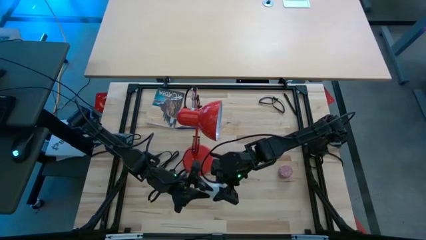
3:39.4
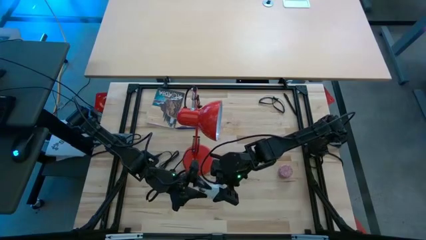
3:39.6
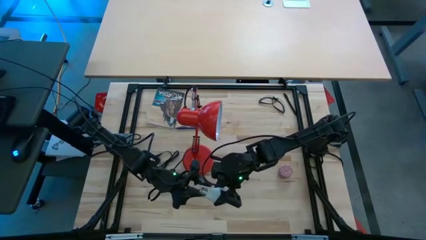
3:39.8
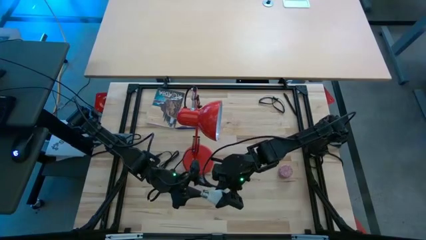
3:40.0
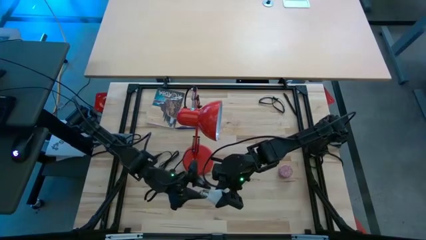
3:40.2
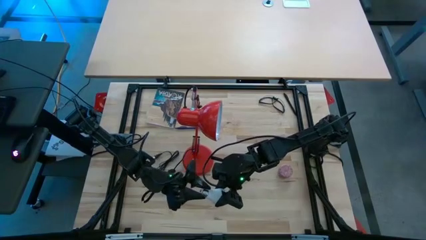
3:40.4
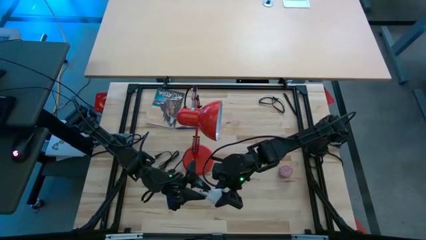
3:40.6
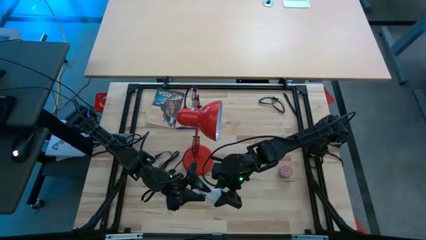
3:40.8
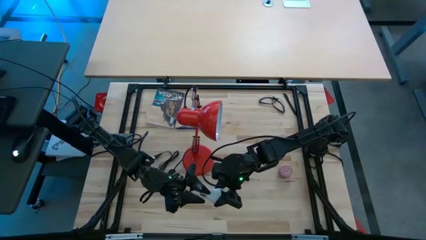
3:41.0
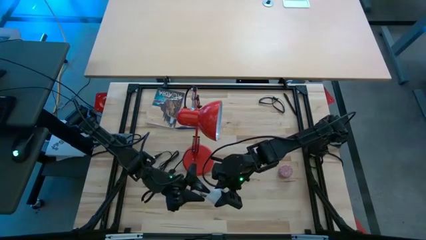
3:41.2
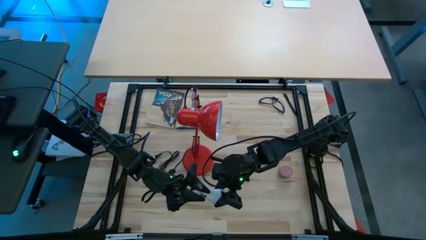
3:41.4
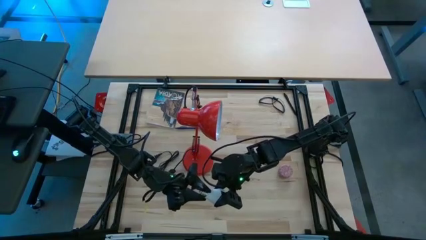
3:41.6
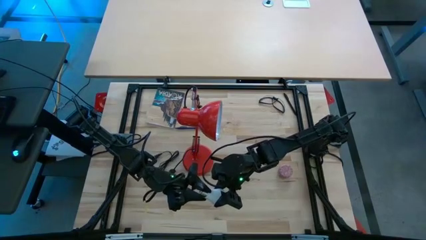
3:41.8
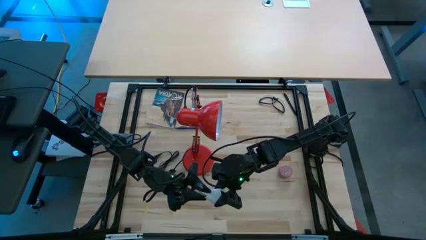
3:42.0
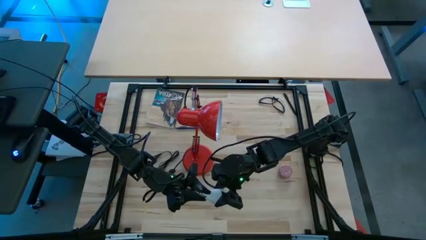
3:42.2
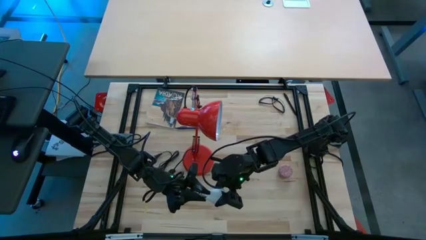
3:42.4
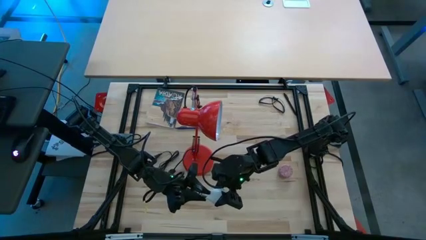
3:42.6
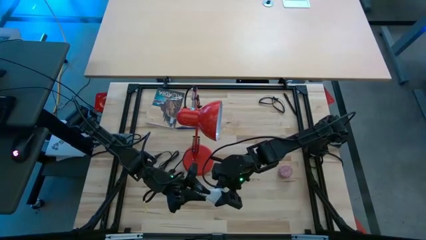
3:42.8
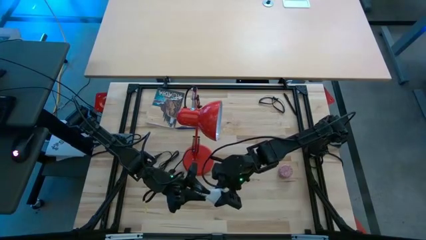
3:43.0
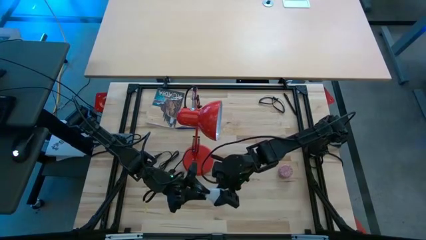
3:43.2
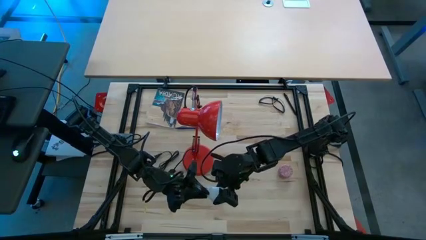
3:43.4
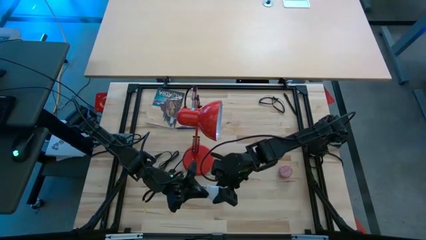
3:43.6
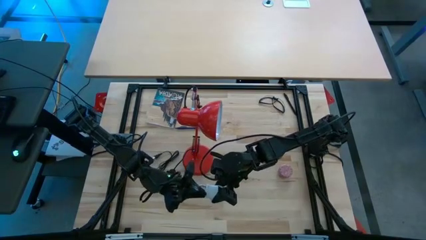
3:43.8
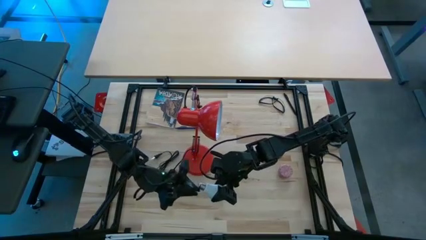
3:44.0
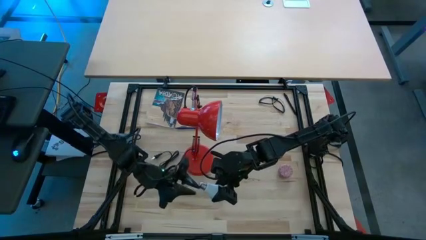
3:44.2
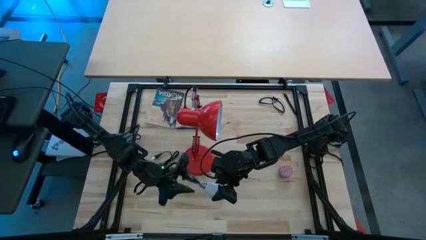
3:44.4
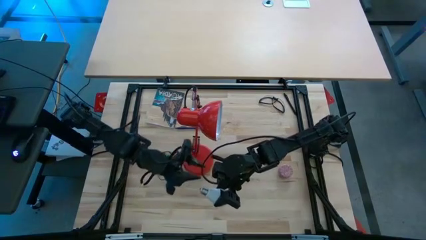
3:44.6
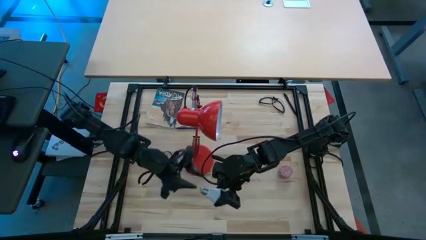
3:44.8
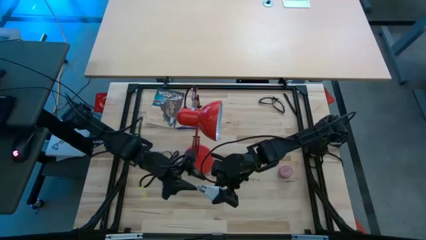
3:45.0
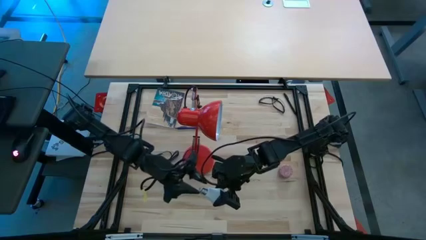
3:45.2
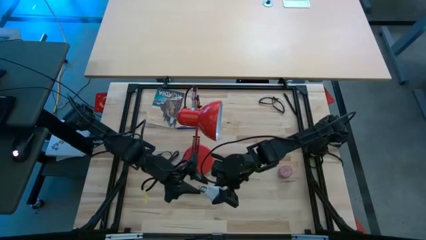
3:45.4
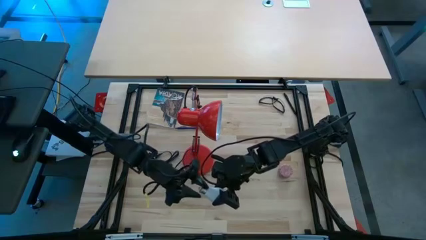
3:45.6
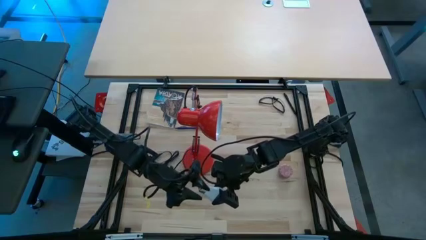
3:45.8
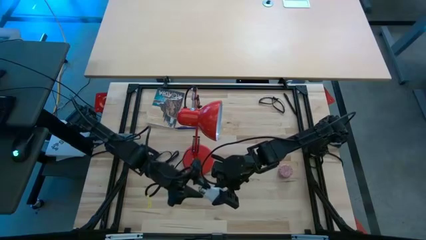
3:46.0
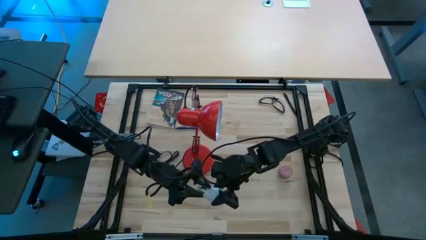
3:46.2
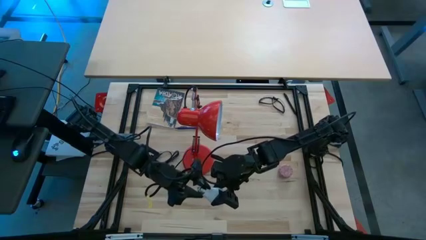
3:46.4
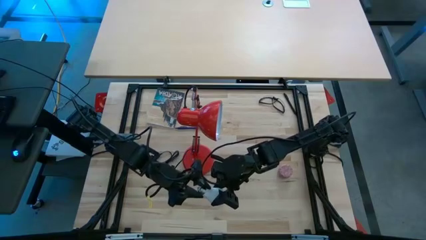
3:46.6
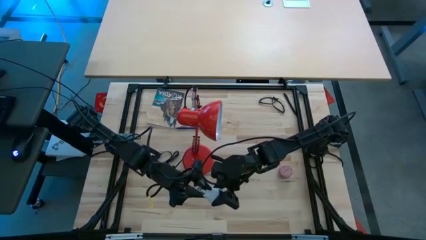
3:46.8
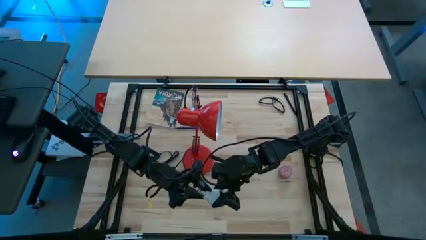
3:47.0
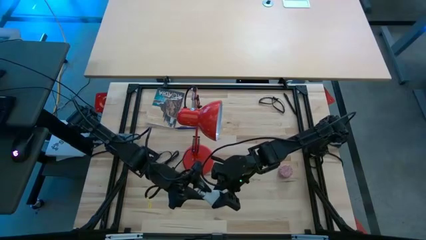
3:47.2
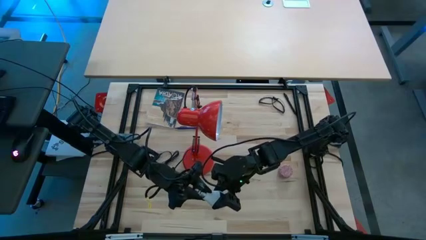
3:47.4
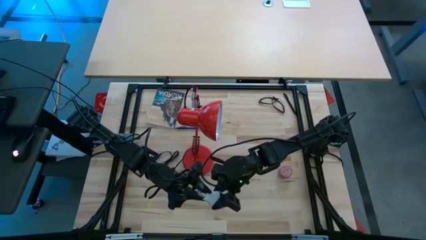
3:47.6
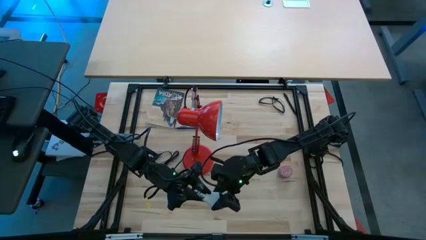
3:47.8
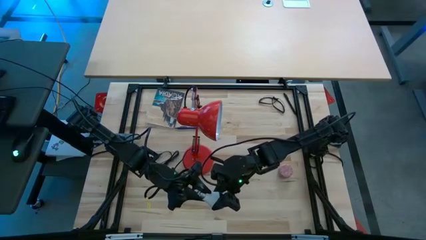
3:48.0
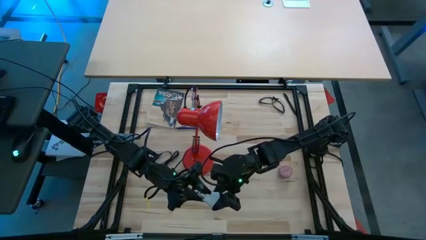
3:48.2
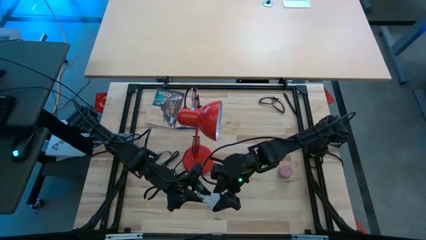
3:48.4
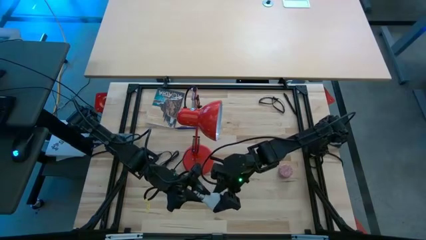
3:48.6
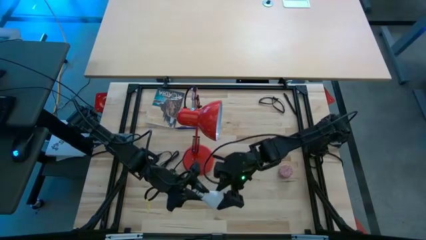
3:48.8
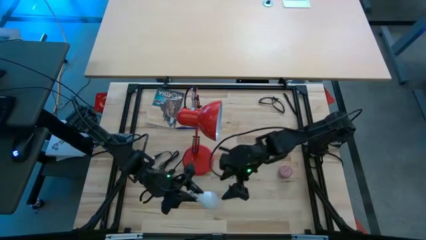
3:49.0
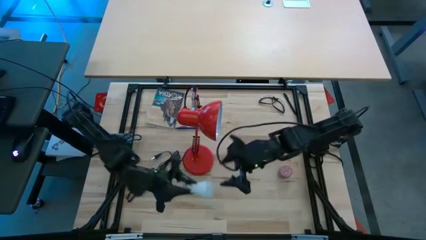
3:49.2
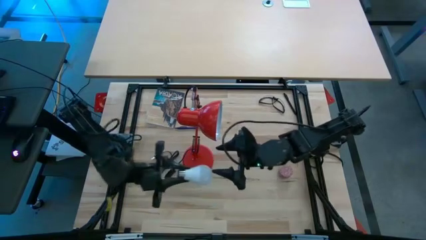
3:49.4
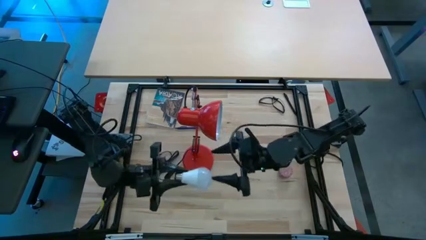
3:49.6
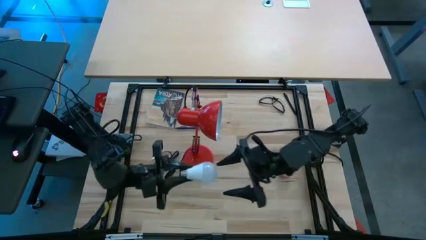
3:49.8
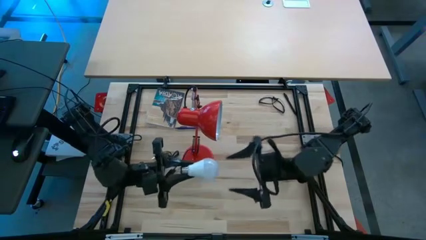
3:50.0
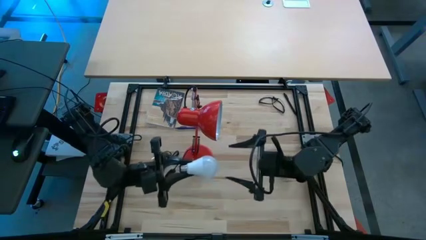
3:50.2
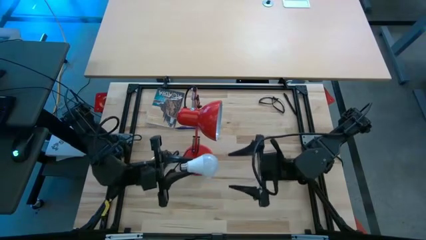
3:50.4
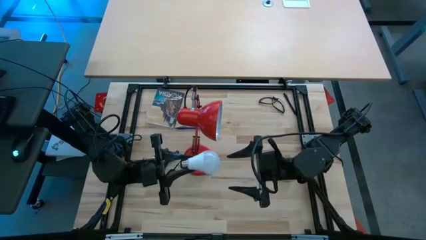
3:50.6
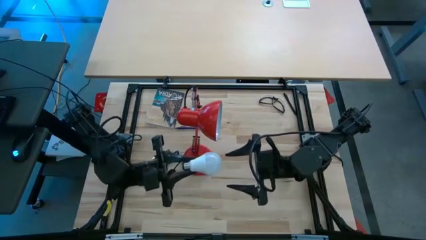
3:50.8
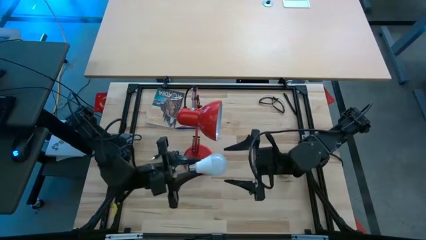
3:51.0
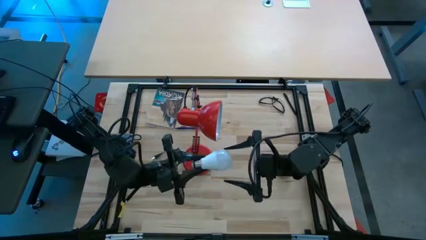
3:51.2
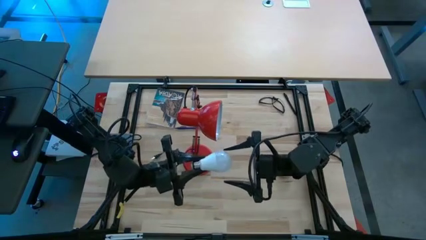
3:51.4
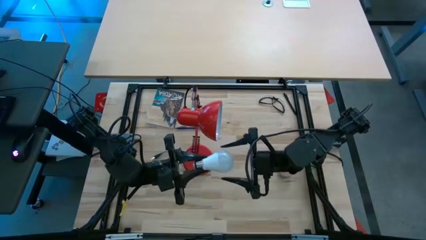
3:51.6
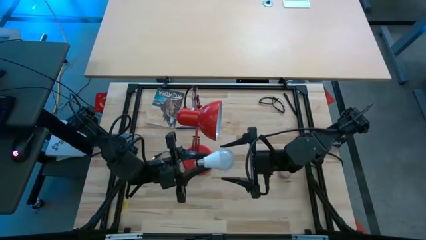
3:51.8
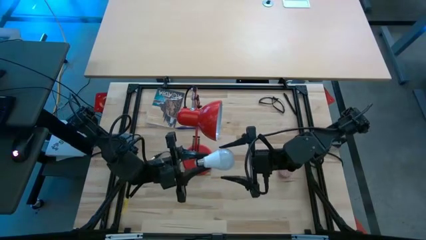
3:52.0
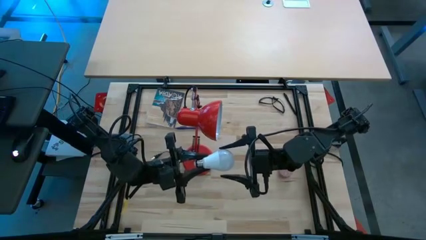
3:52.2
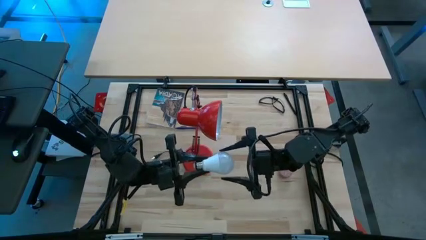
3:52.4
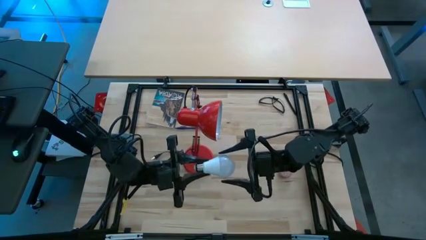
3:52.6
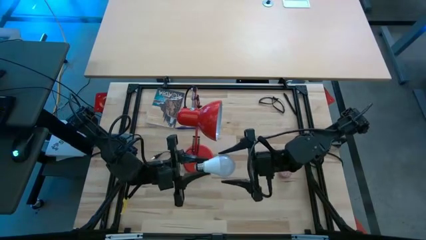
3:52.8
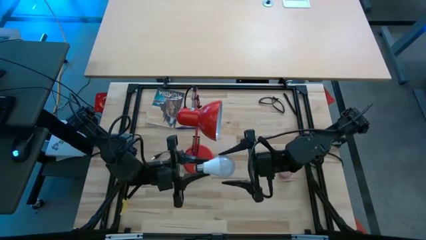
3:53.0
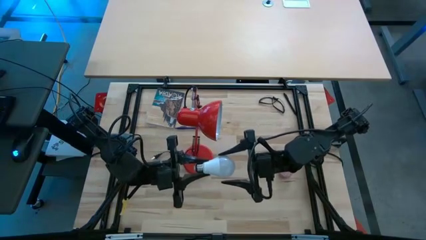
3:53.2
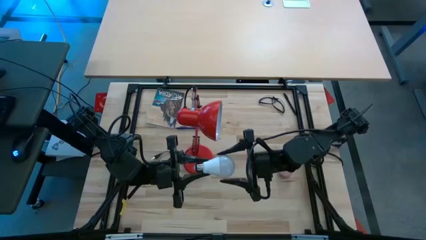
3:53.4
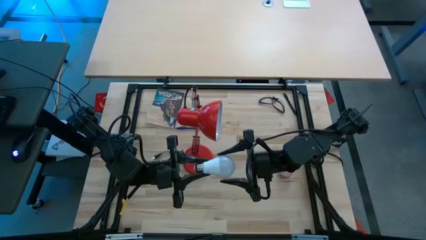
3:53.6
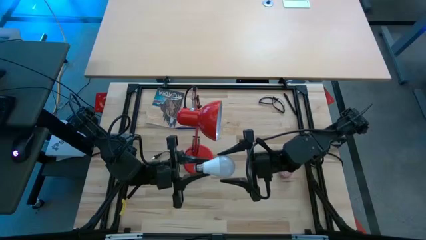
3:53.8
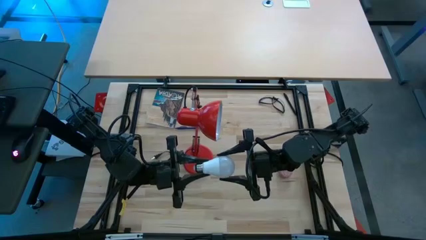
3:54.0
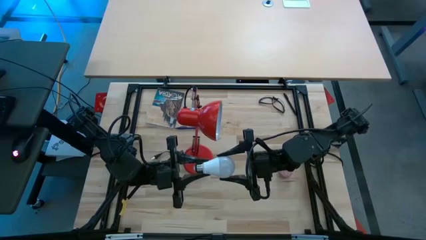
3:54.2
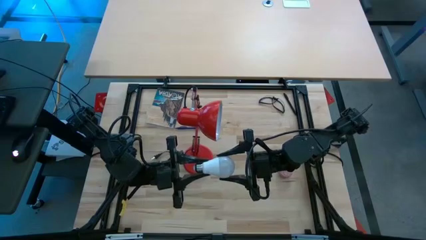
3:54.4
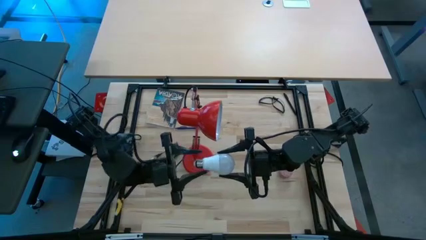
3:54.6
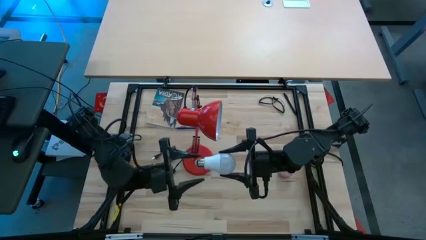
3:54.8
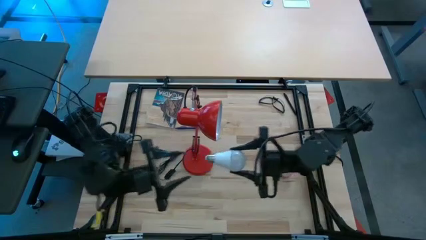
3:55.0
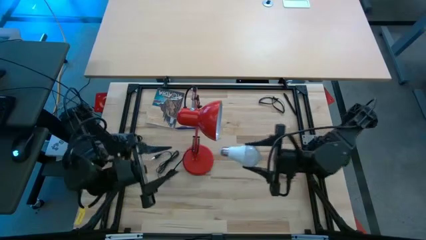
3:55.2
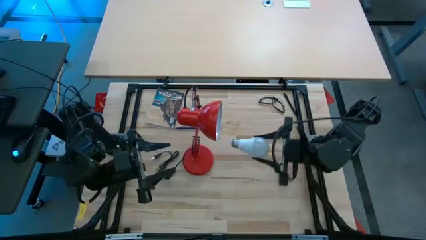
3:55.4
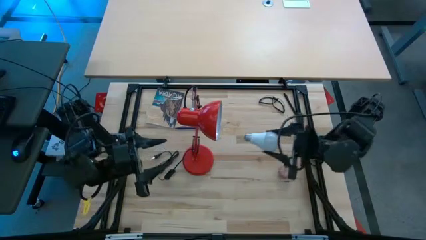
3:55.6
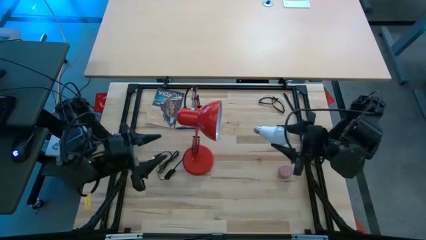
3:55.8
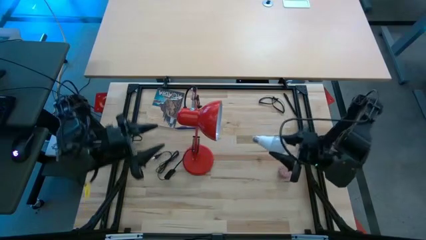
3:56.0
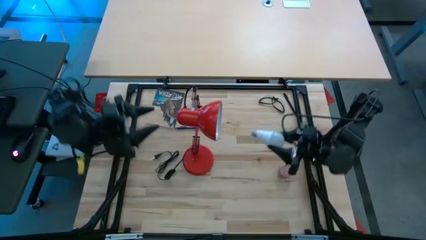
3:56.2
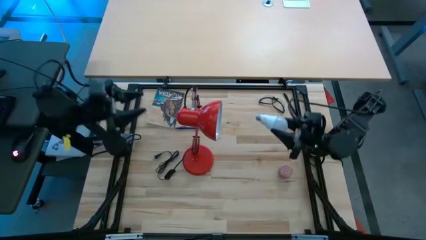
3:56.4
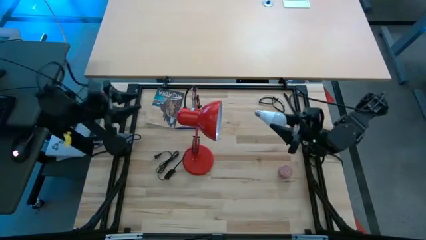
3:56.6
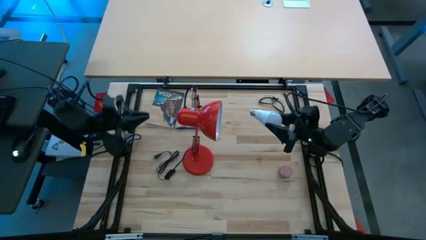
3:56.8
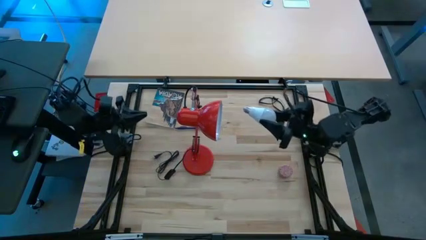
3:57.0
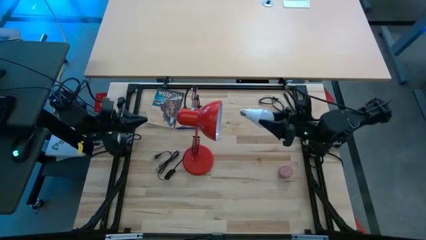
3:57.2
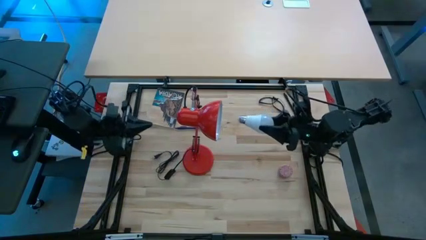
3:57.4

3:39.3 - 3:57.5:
Task: Screw lightbulb
Insert the lightbulb on the lamp
